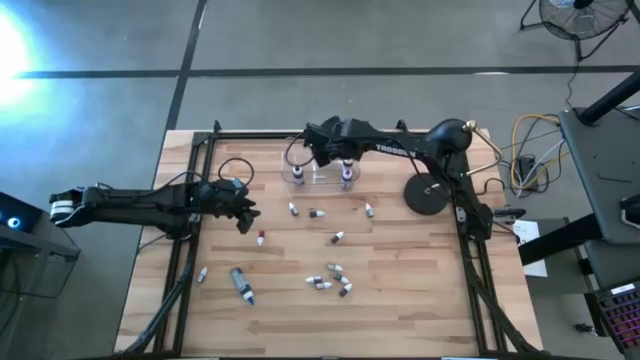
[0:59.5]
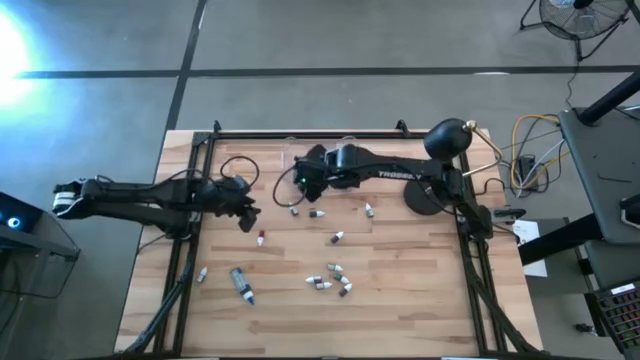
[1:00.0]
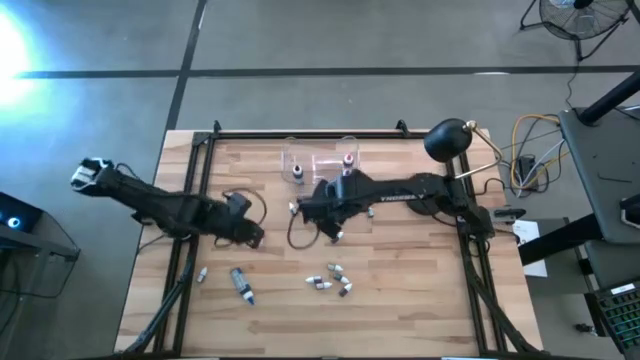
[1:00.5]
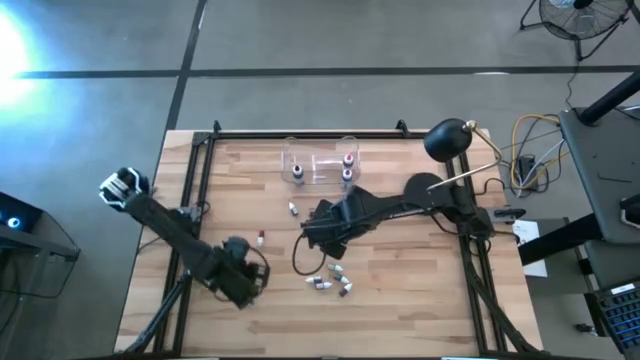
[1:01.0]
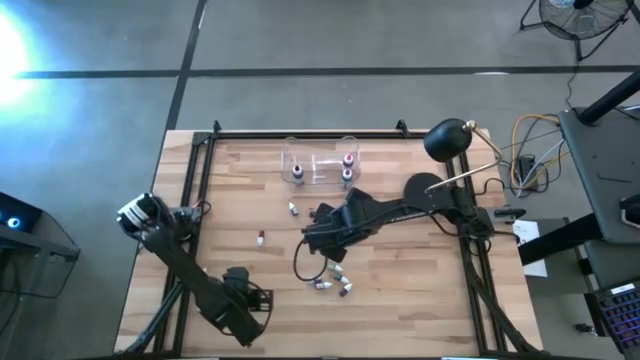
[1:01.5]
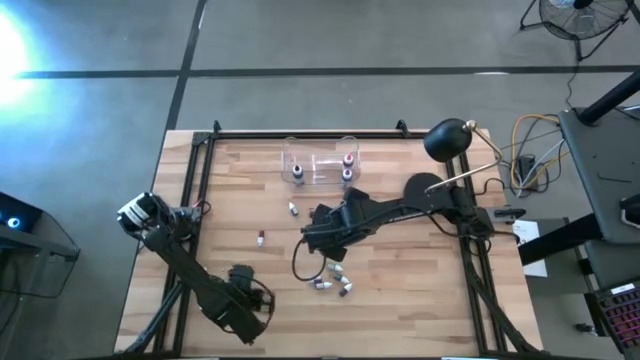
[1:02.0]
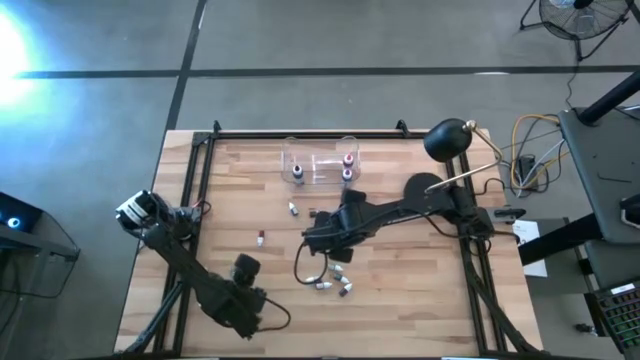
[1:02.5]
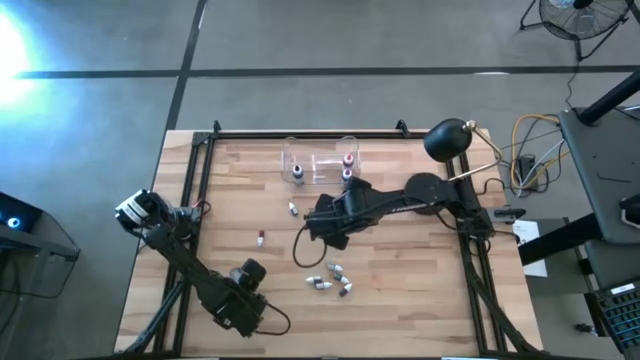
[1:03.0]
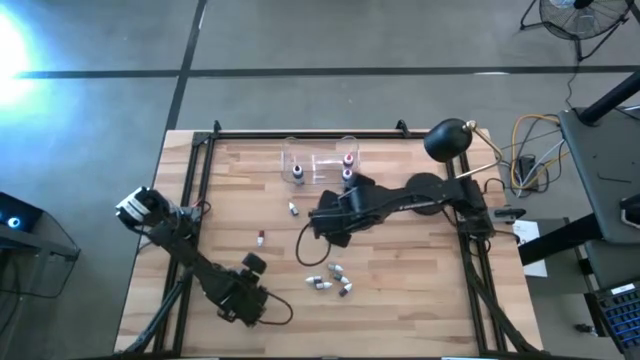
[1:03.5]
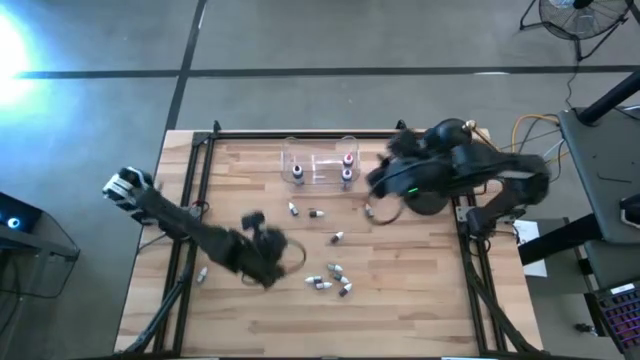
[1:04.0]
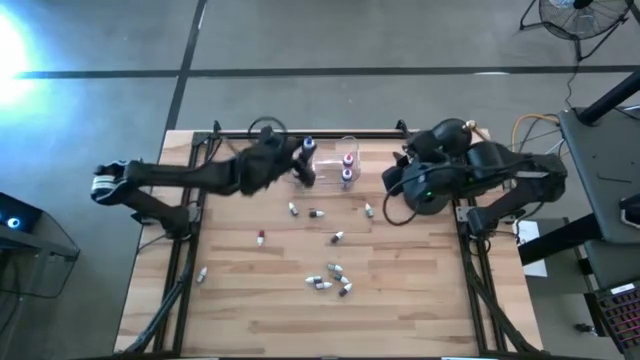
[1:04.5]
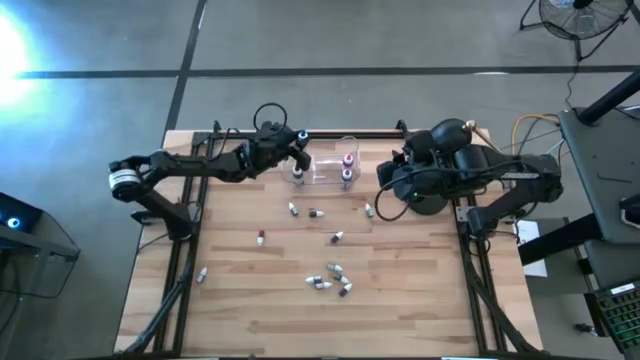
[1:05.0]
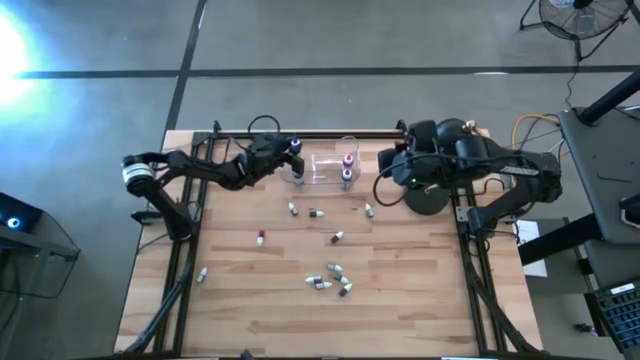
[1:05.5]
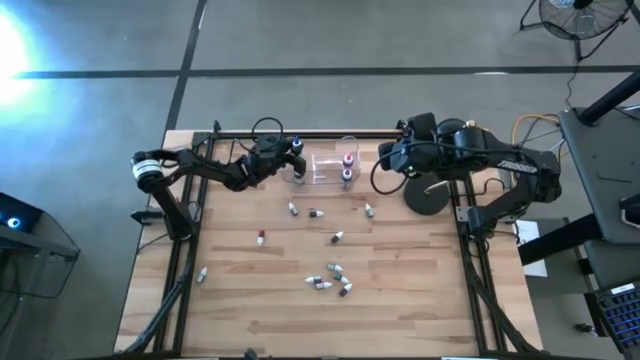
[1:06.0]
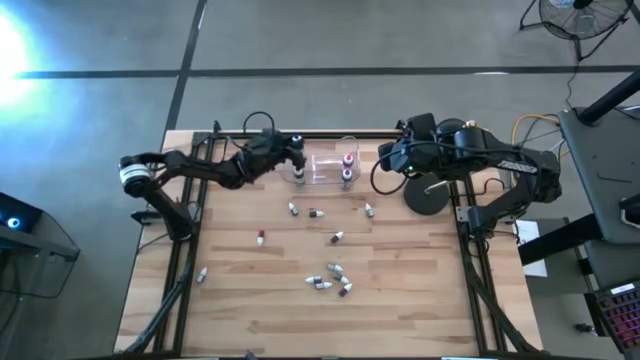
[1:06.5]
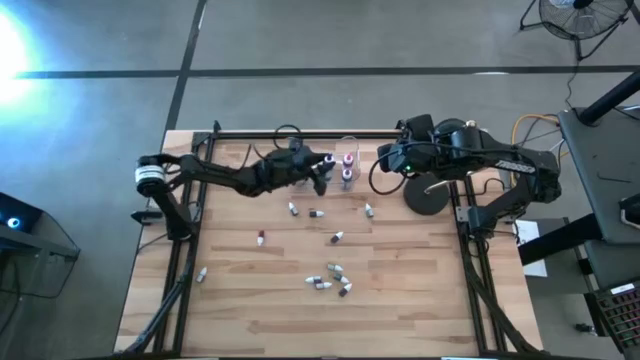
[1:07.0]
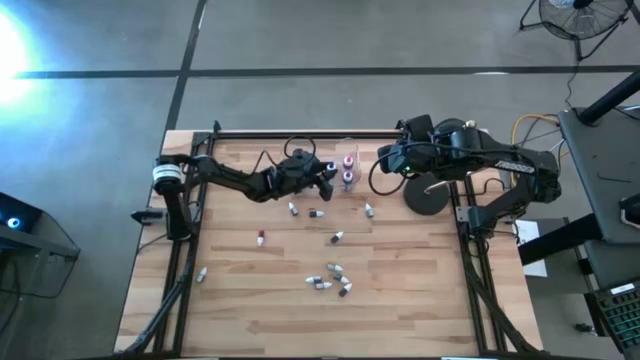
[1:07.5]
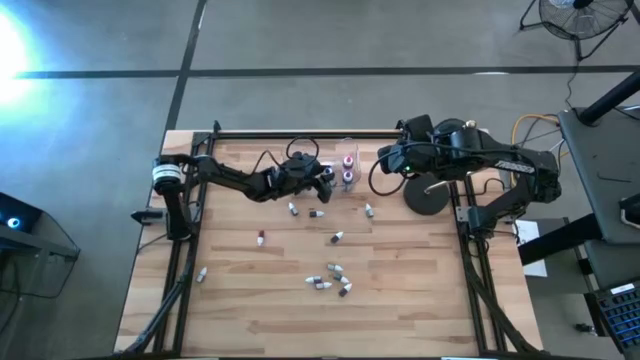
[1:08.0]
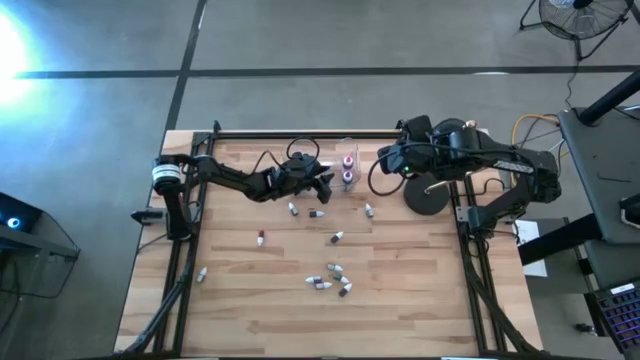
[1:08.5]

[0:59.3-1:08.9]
Task: Pick & Place food coloring
Put the large blue food coloring bottle into the transparent bin

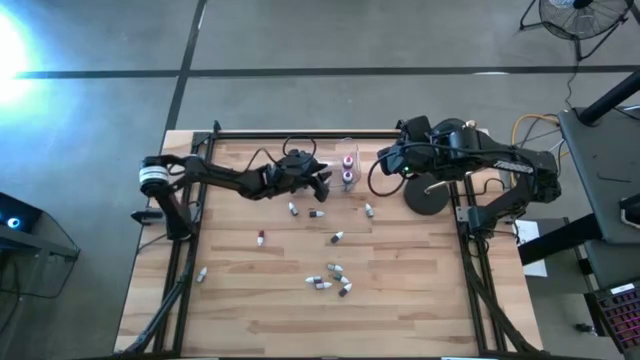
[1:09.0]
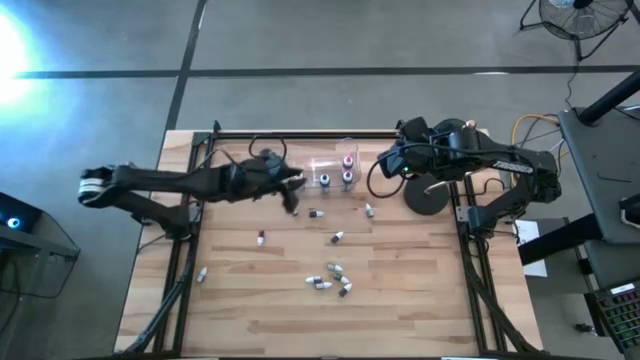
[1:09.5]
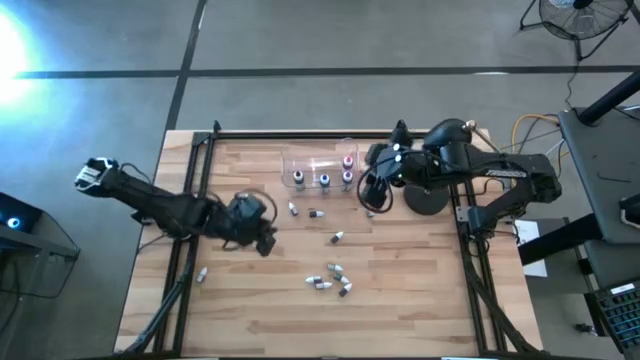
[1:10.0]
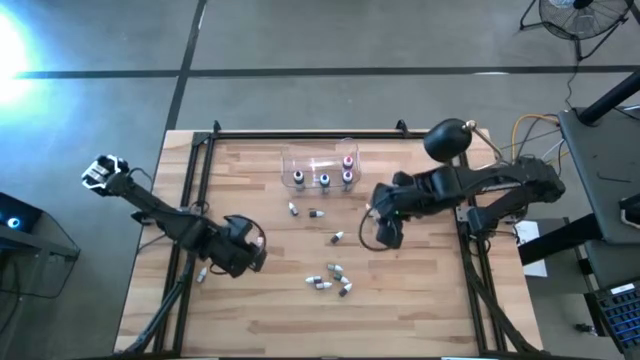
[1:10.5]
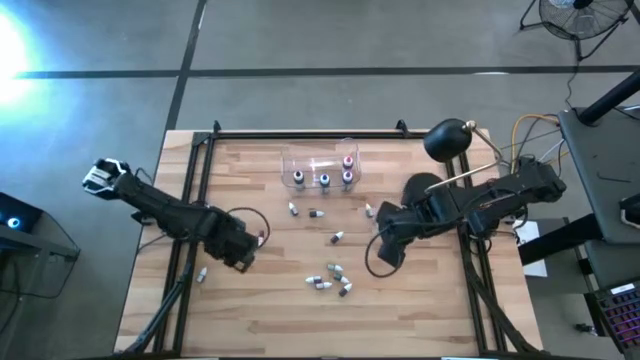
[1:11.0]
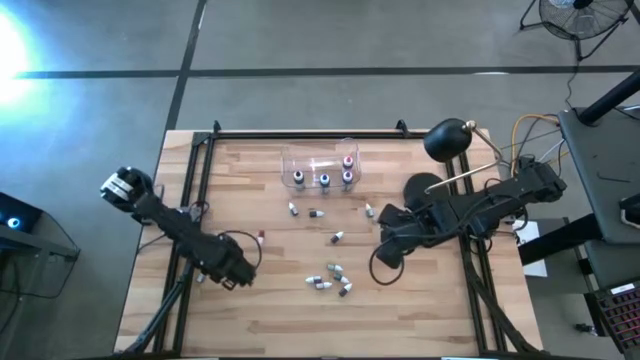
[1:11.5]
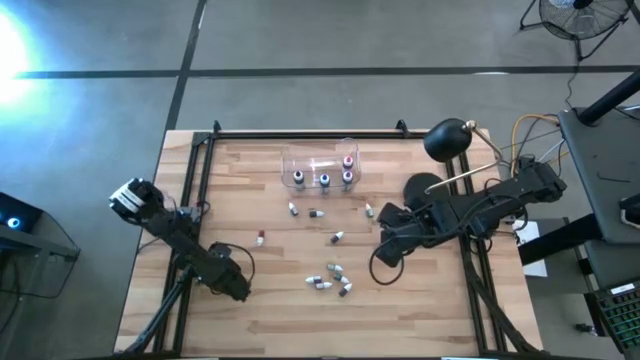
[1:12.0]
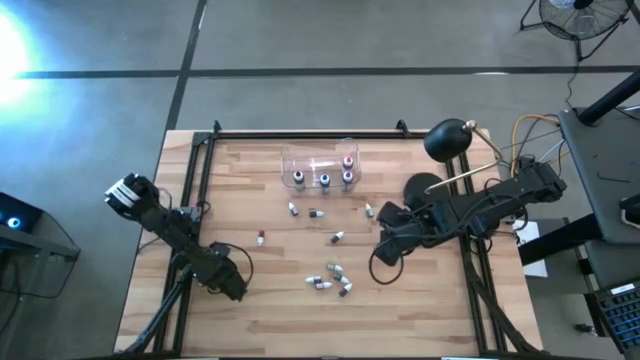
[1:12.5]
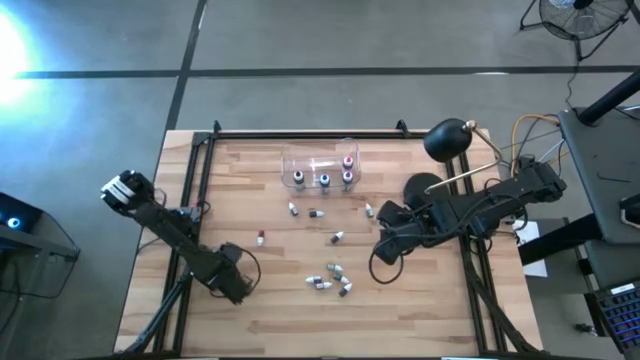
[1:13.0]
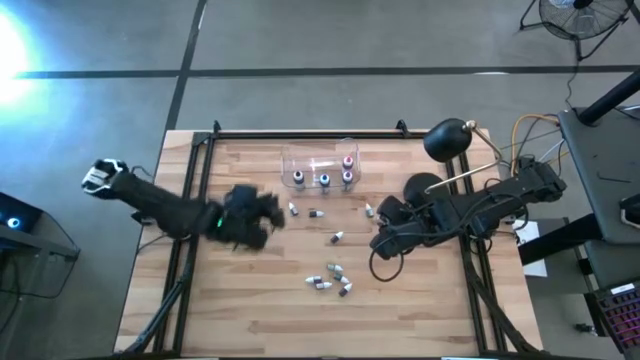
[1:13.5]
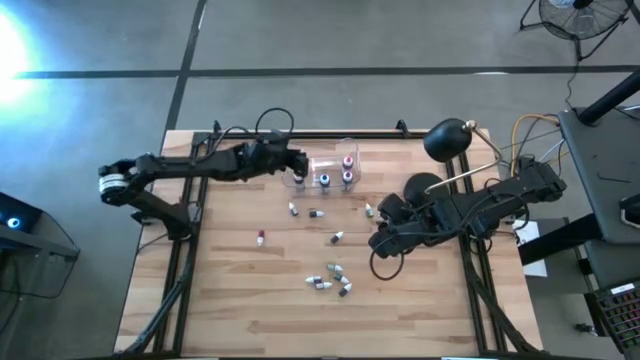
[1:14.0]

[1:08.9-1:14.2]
Put the small black food coloring bottle into the transparent bin

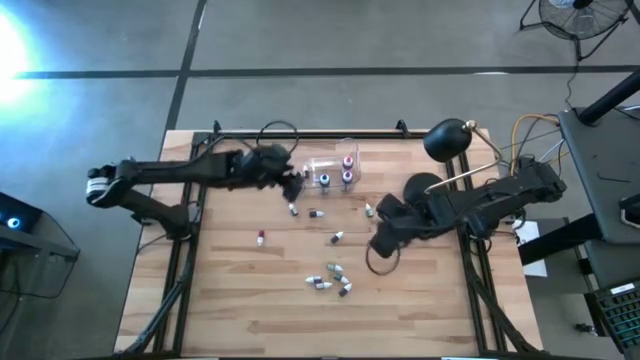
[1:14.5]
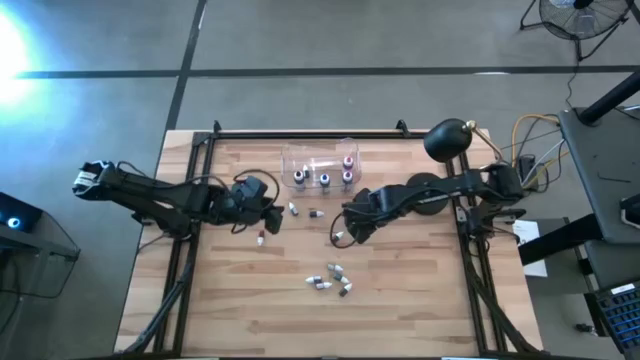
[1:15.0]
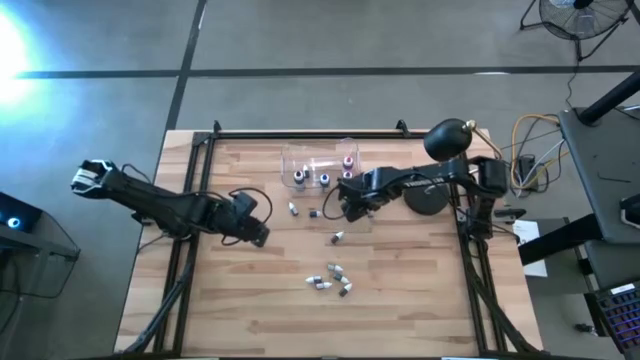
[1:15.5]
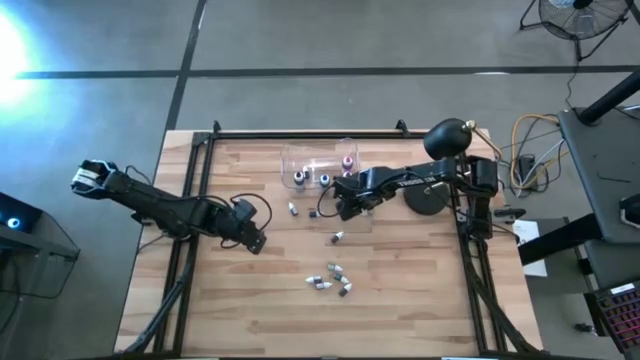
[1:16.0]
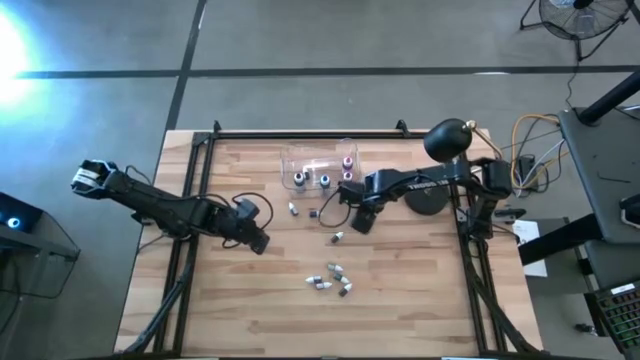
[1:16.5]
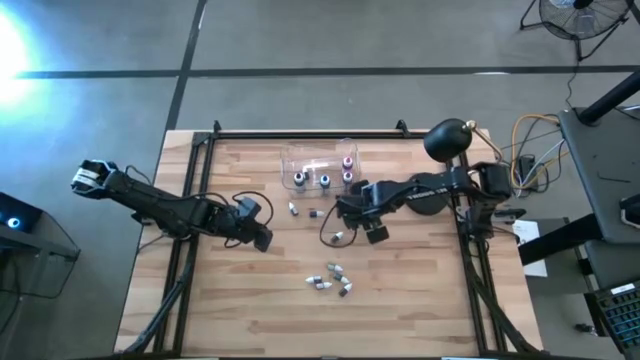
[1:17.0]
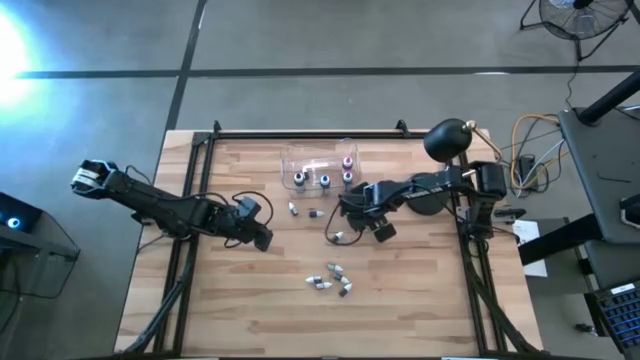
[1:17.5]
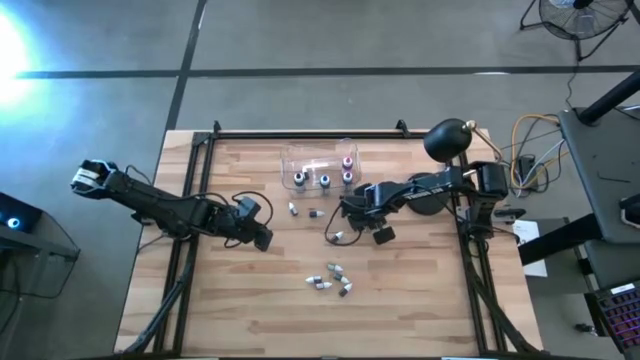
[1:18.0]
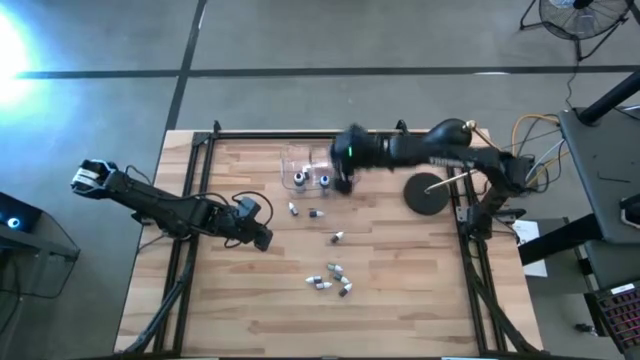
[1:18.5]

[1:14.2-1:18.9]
Put the small green food coloring bottle into the transparent bin

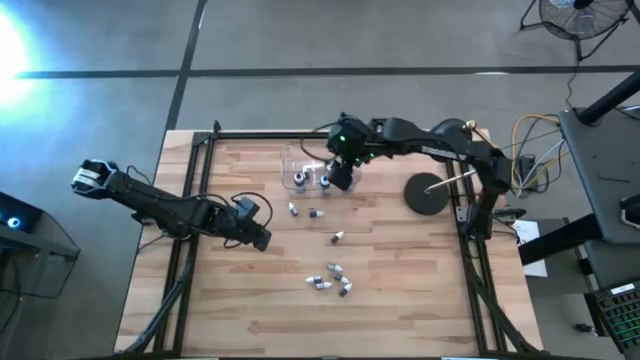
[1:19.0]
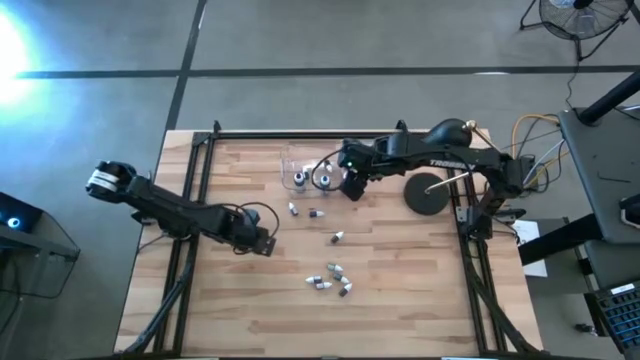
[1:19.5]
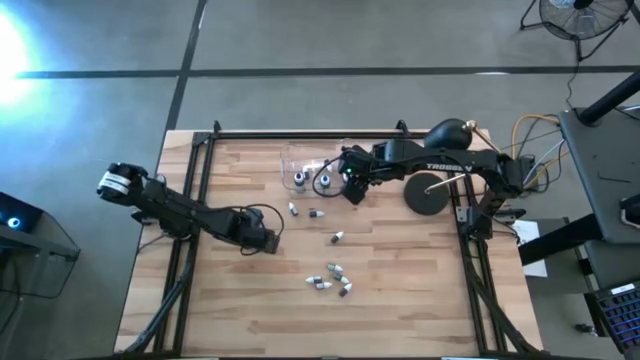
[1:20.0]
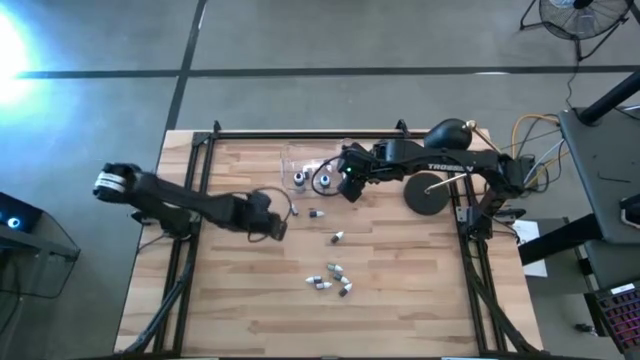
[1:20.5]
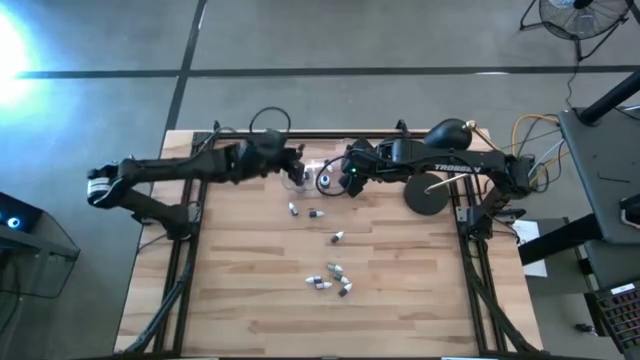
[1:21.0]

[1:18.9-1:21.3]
Put the small orange food coloring bottle into the transparent bin
